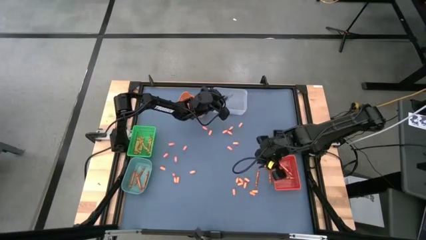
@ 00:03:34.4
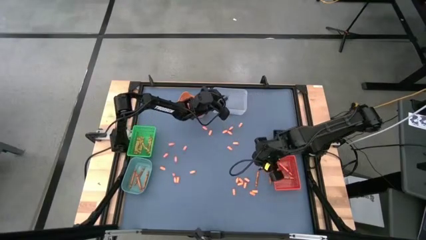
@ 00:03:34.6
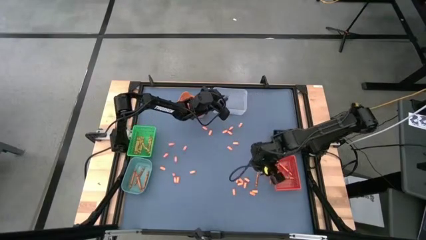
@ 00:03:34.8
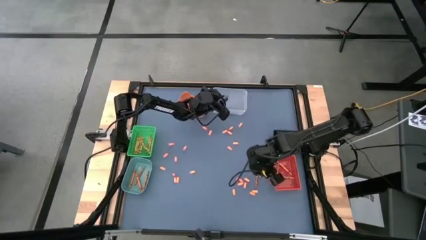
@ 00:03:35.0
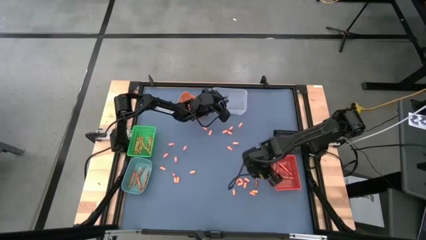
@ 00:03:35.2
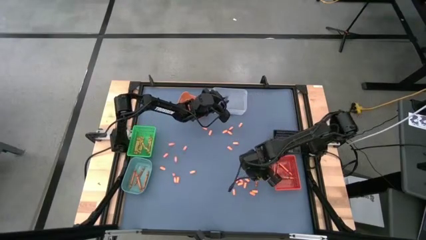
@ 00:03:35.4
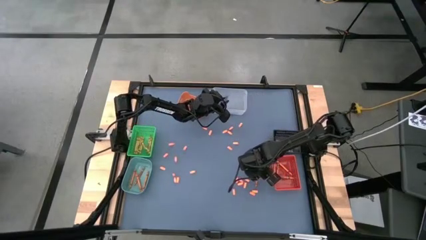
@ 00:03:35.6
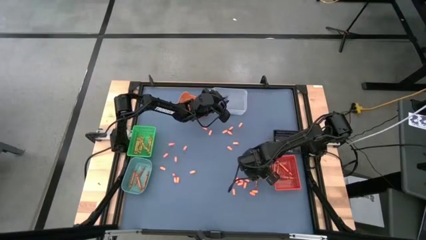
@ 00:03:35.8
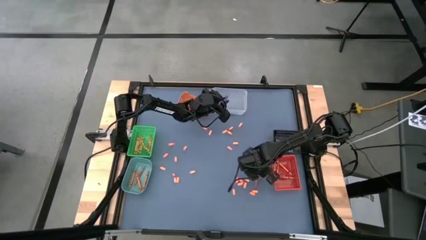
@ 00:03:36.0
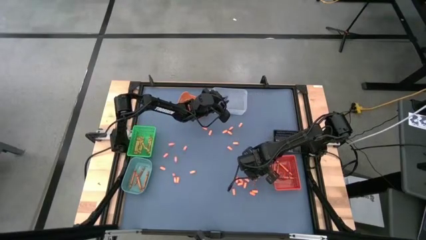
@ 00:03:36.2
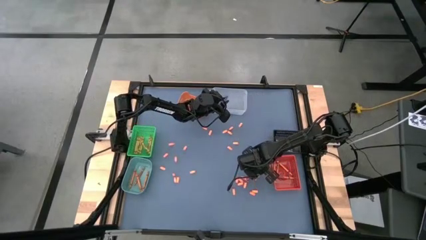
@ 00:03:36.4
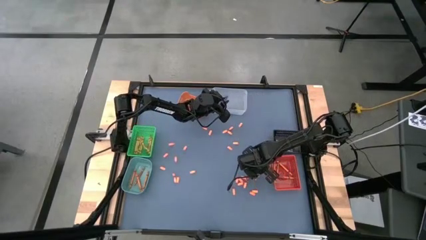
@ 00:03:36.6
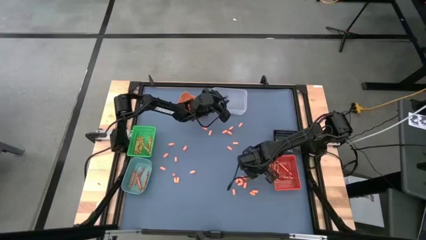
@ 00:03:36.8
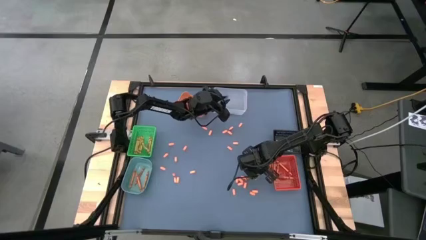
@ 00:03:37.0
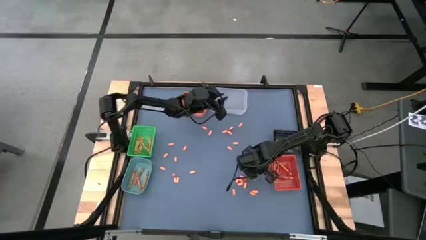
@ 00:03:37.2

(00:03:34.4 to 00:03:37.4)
Task: Sort crayons
Put the red crayon into the orange bin

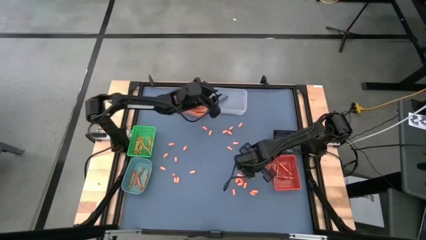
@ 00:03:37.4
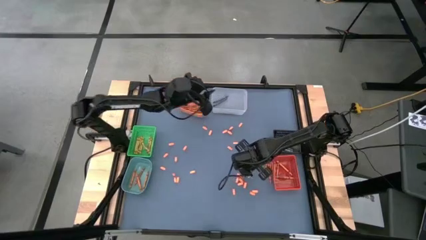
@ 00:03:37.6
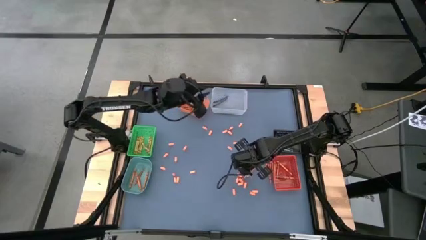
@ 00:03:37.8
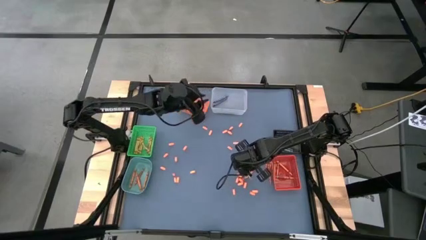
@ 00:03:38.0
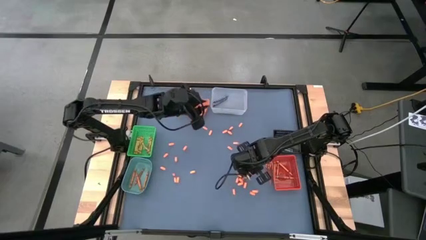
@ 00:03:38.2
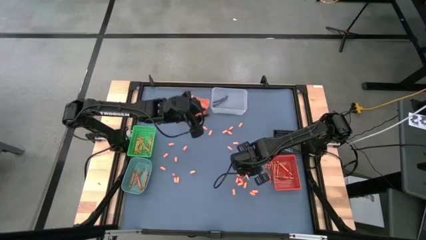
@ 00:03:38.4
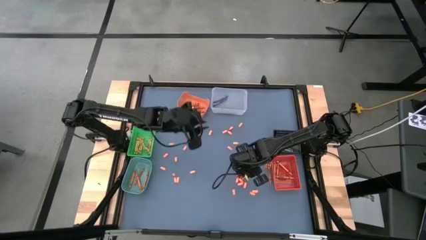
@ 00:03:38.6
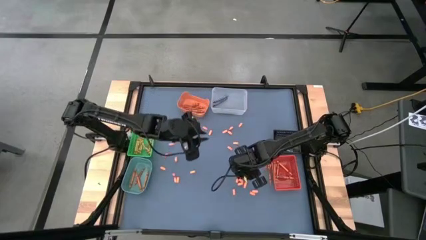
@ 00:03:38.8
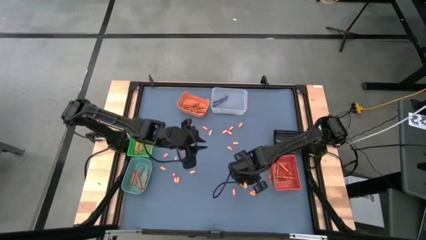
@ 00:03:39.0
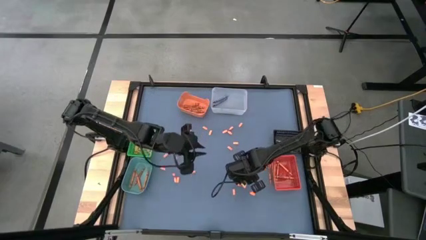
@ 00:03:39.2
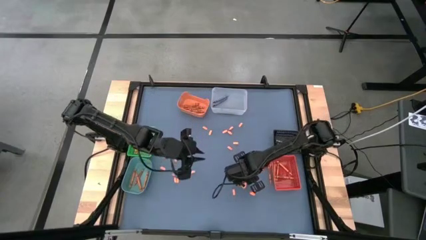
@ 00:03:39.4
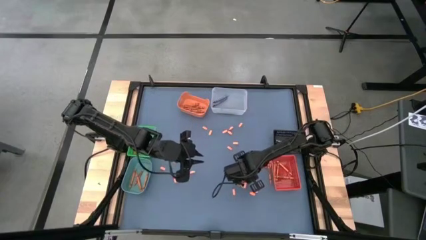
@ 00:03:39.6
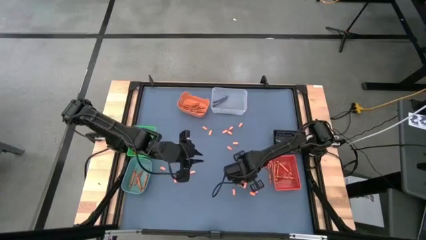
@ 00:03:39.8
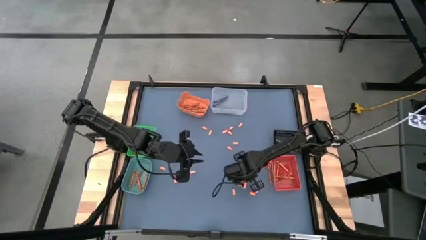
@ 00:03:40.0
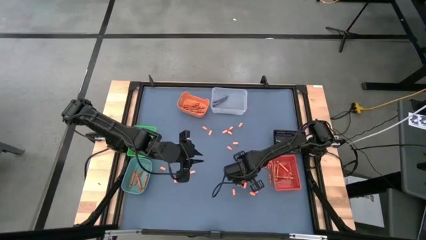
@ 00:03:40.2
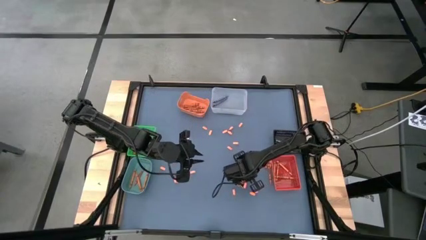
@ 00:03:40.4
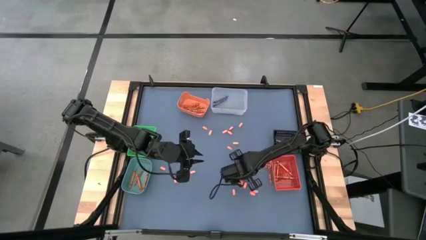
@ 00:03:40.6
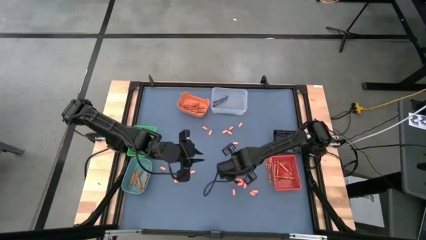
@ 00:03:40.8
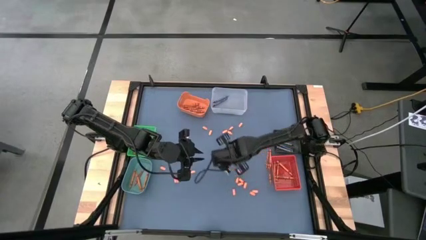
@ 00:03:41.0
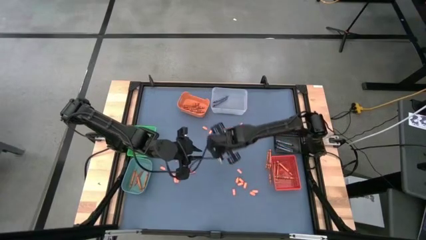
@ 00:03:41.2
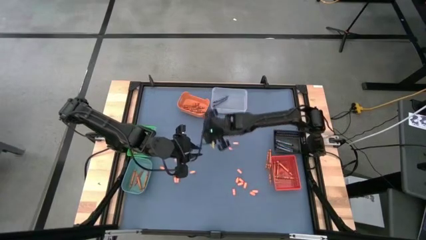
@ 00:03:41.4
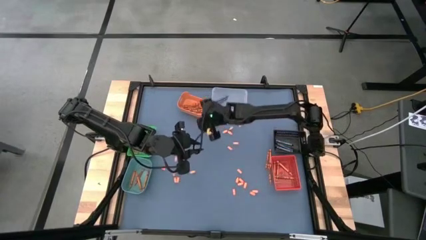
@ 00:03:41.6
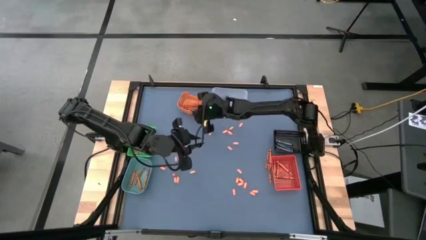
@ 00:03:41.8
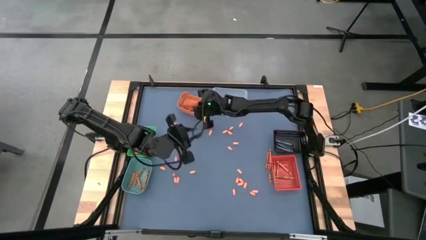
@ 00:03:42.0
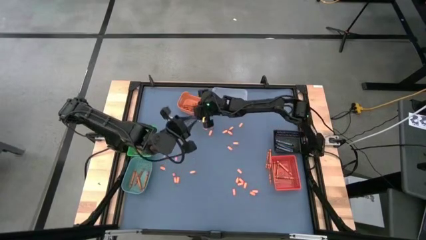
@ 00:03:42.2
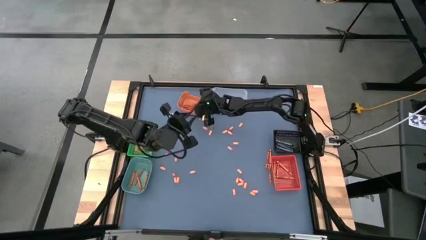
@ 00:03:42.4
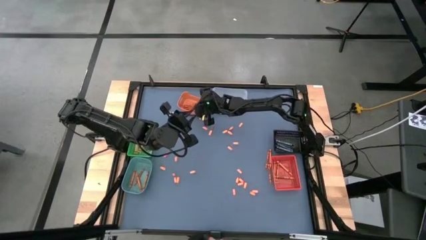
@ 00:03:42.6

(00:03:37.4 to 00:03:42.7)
Put the red crayon into the orange bin

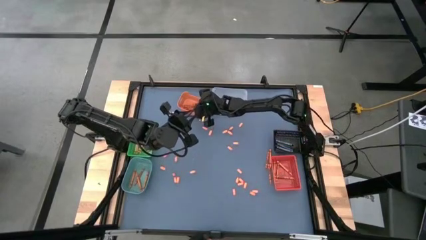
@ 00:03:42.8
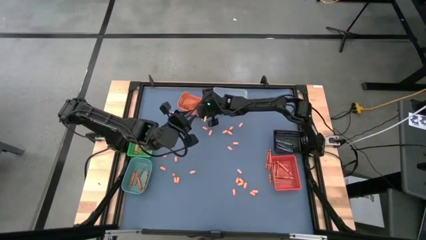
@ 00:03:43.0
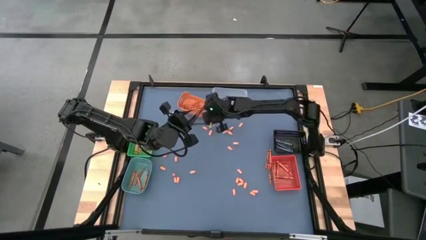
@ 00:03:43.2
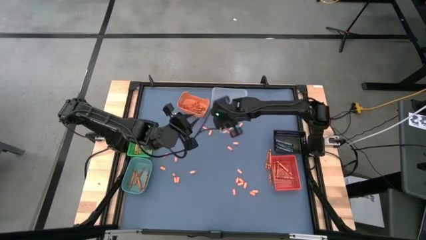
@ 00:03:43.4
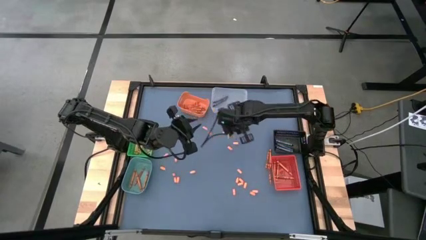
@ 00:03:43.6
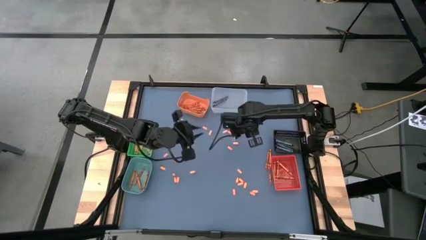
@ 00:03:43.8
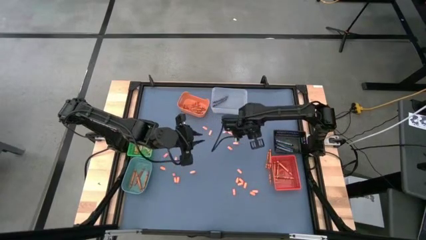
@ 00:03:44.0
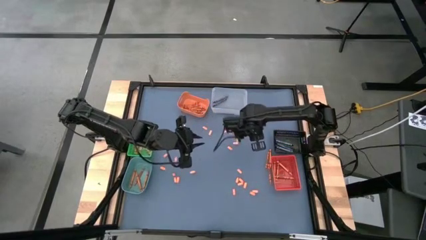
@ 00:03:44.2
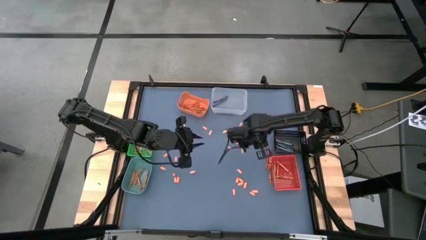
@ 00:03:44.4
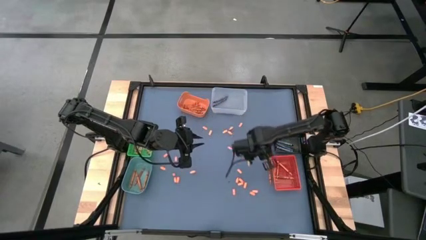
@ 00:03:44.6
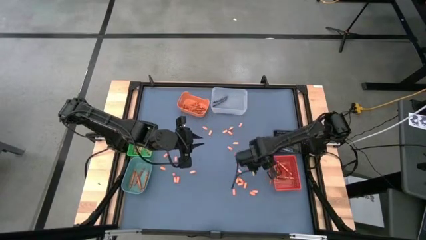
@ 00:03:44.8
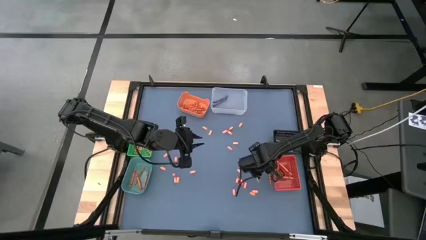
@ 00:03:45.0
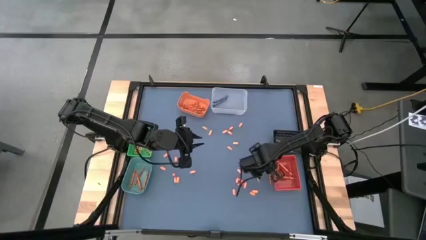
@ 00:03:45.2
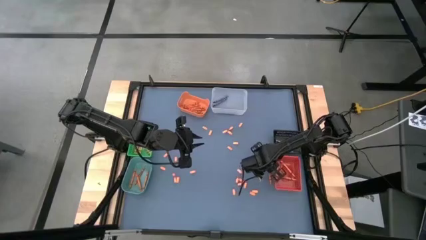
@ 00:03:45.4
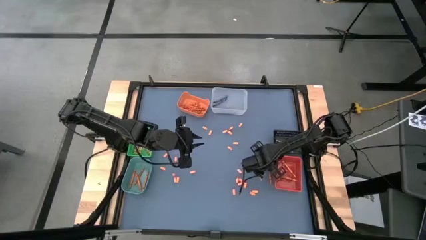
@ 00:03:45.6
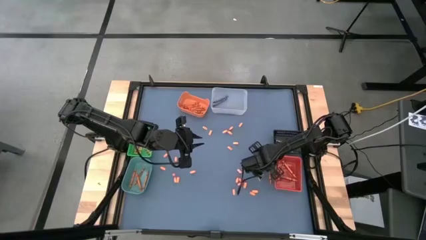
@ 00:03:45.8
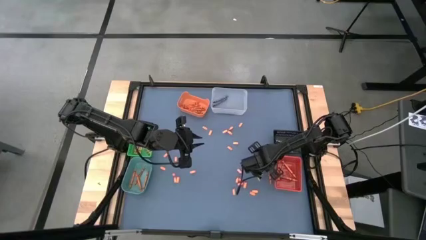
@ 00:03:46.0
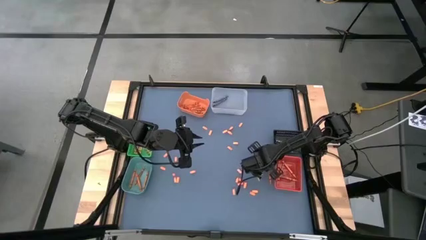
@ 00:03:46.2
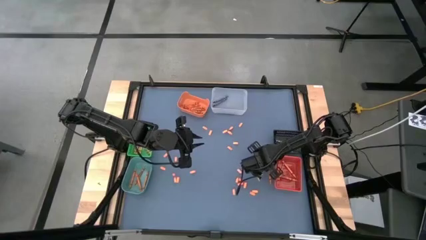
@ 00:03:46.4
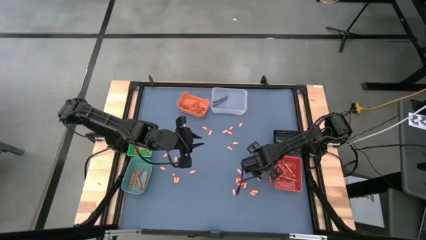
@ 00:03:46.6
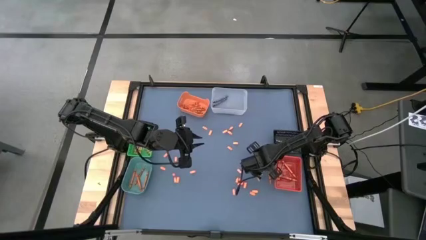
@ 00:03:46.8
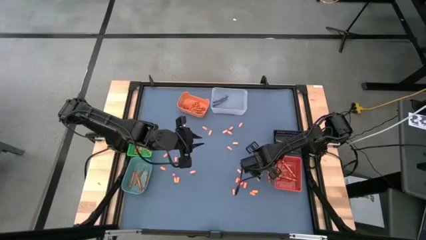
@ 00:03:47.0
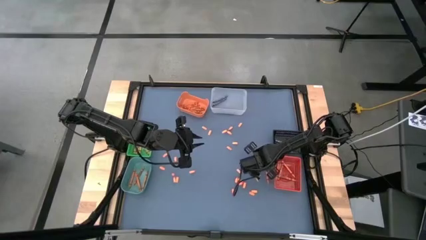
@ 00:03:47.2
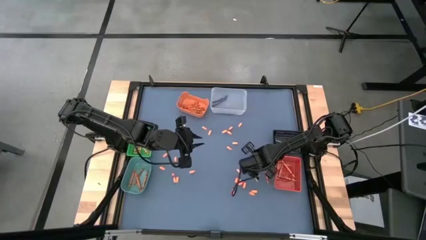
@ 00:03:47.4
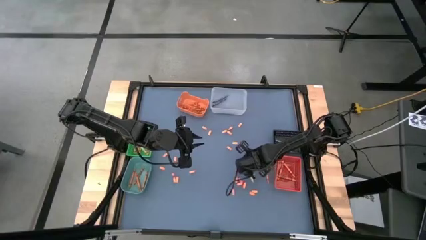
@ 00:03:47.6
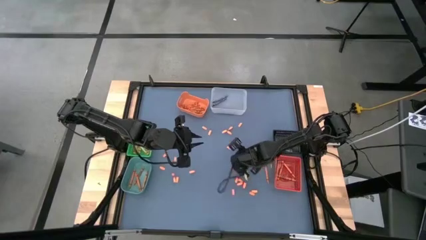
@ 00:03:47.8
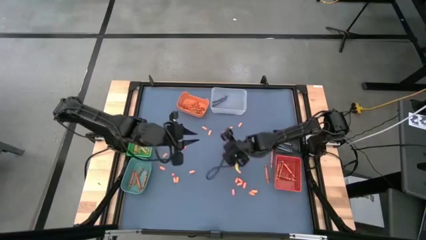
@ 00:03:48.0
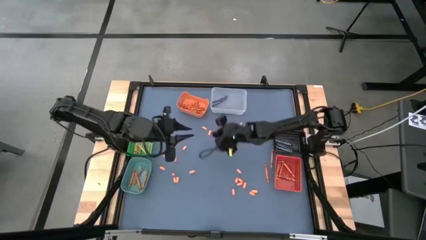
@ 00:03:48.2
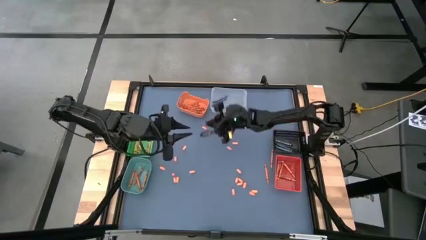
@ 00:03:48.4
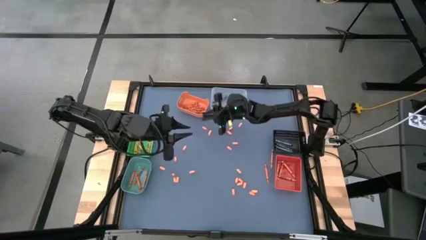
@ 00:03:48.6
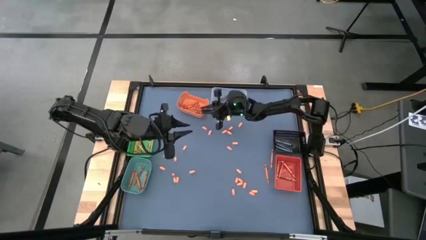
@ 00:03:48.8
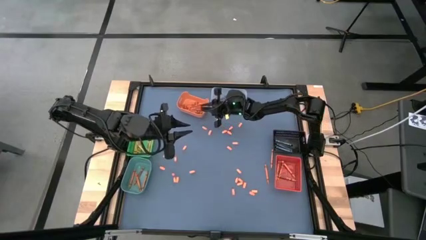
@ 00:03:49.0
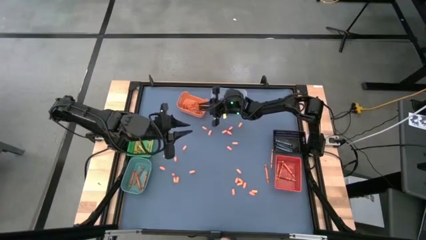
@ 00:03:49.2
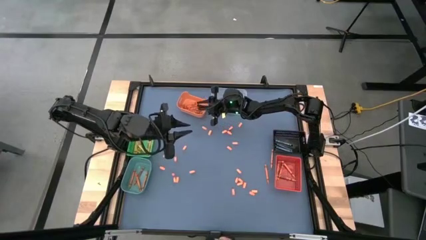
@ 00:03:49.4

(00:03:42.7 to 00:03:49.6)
Put the red crayon into the orange bin
